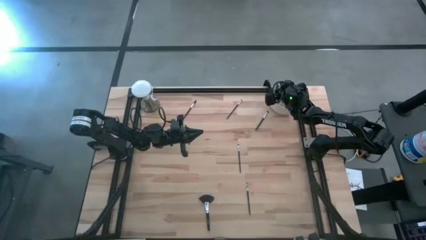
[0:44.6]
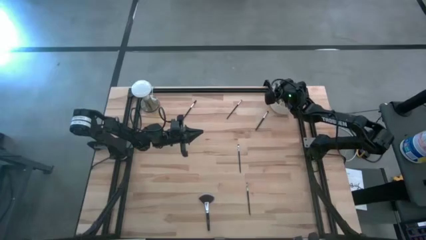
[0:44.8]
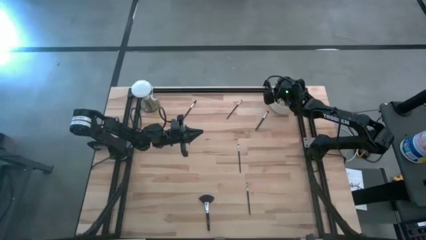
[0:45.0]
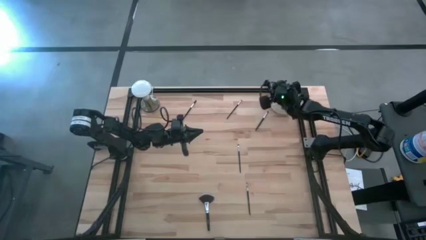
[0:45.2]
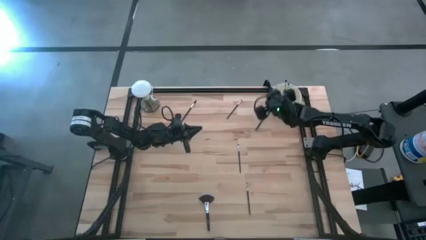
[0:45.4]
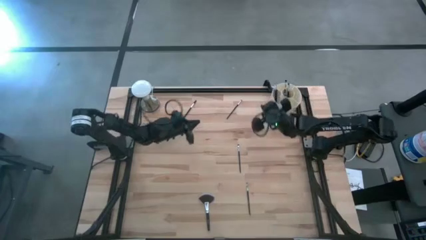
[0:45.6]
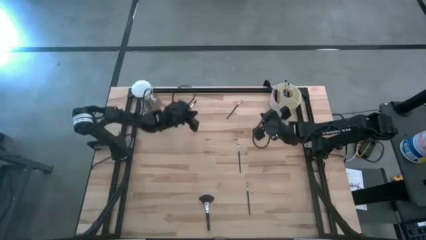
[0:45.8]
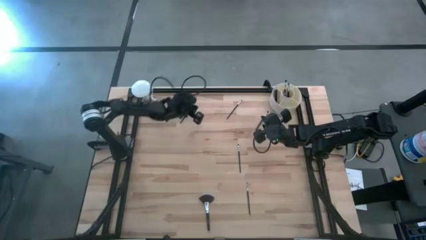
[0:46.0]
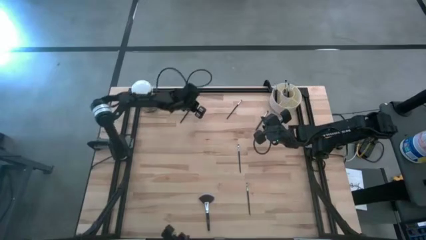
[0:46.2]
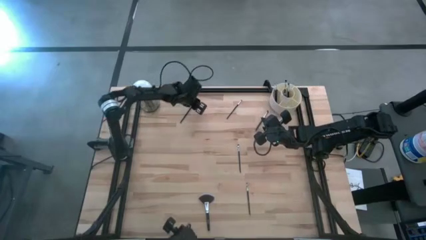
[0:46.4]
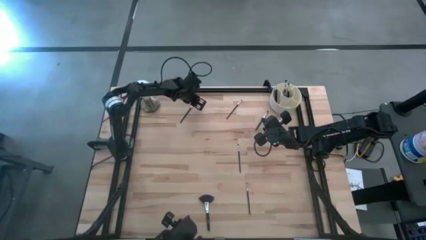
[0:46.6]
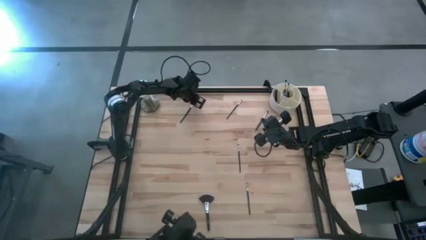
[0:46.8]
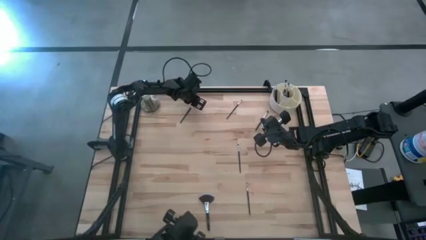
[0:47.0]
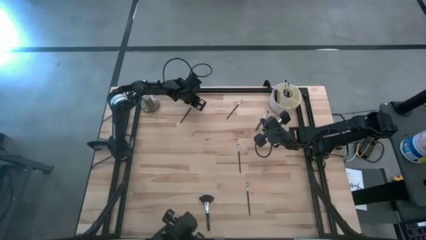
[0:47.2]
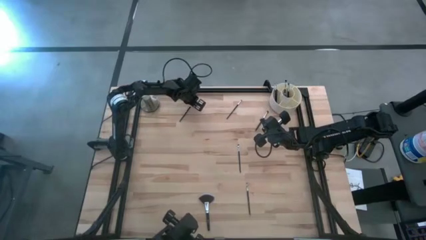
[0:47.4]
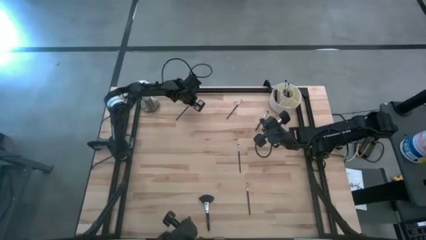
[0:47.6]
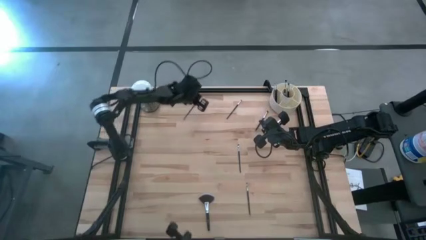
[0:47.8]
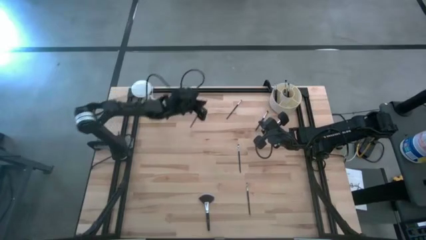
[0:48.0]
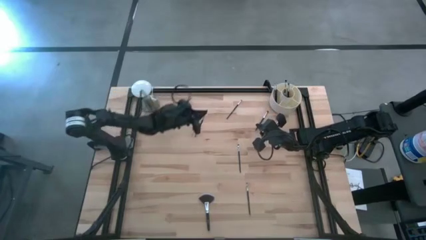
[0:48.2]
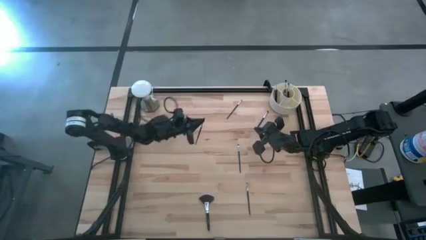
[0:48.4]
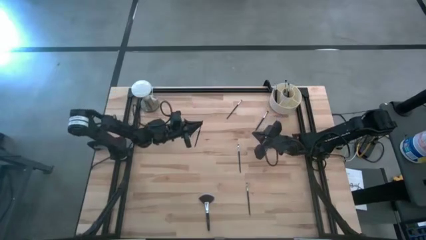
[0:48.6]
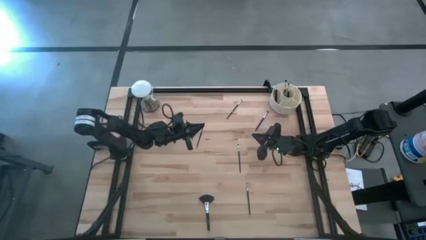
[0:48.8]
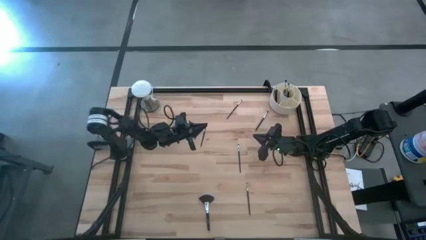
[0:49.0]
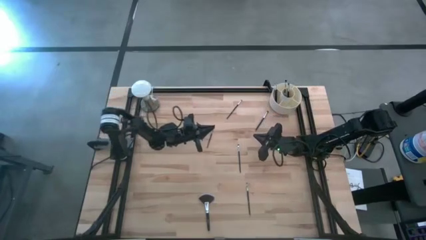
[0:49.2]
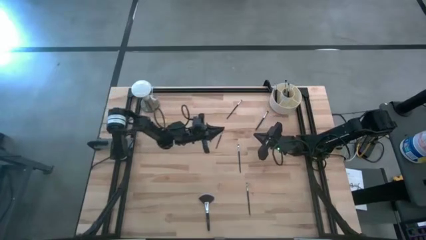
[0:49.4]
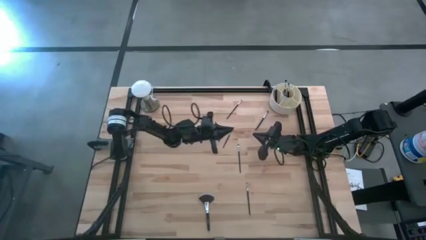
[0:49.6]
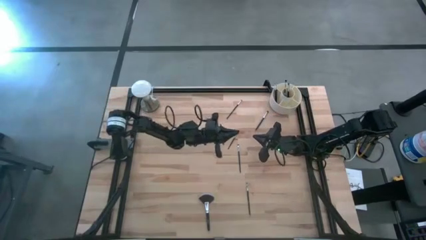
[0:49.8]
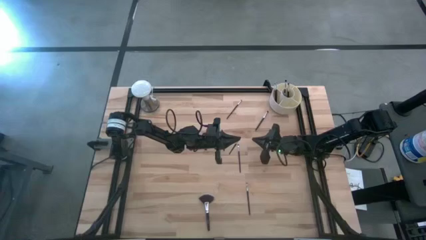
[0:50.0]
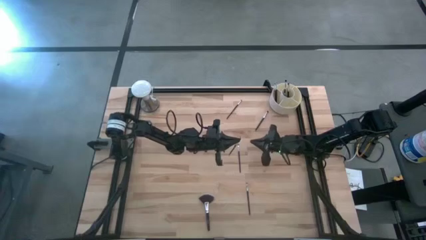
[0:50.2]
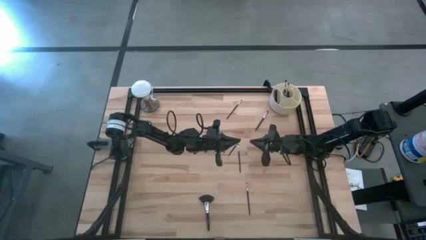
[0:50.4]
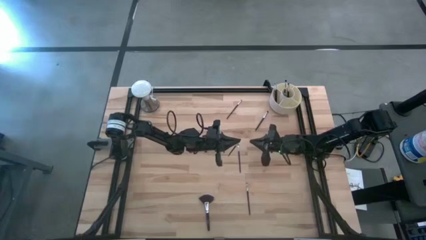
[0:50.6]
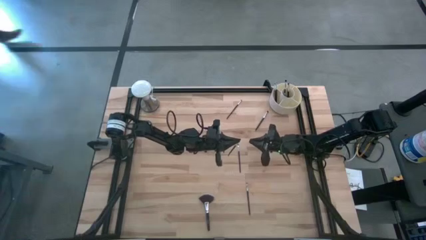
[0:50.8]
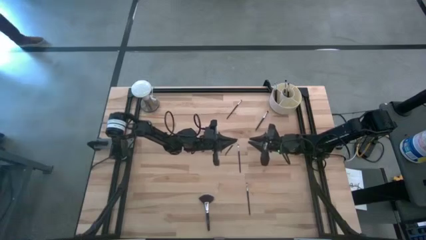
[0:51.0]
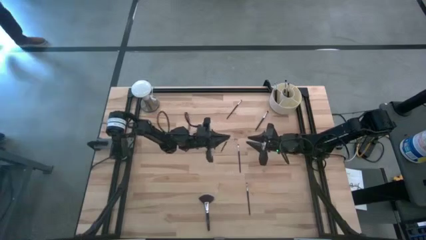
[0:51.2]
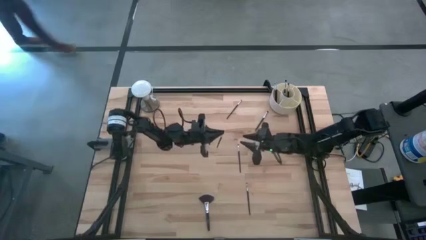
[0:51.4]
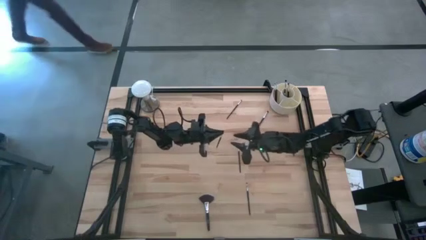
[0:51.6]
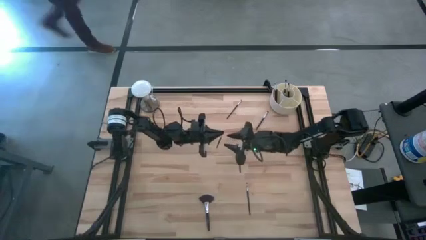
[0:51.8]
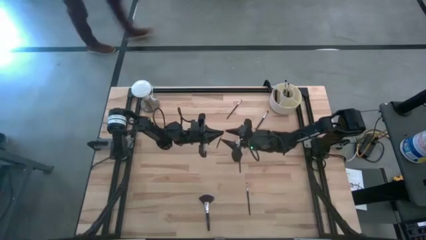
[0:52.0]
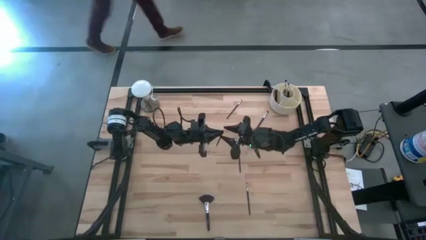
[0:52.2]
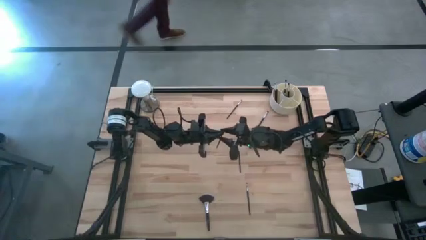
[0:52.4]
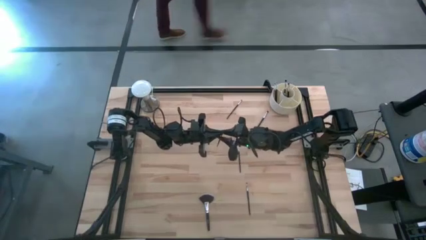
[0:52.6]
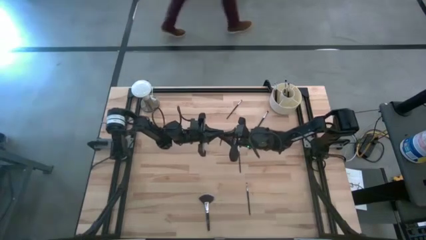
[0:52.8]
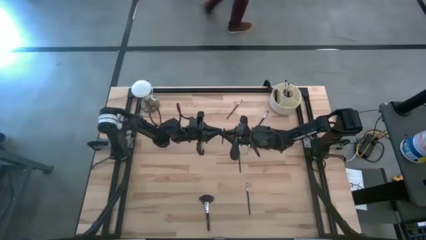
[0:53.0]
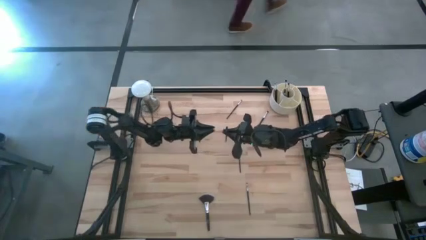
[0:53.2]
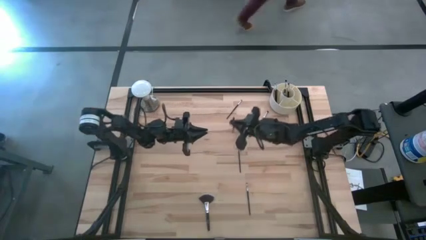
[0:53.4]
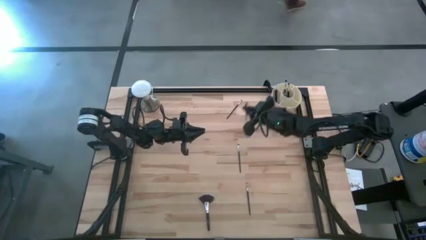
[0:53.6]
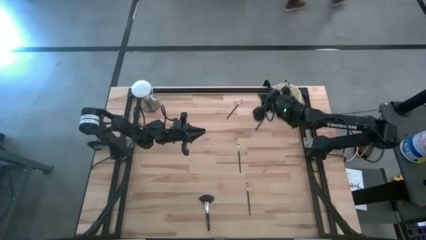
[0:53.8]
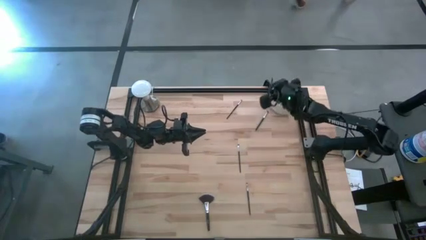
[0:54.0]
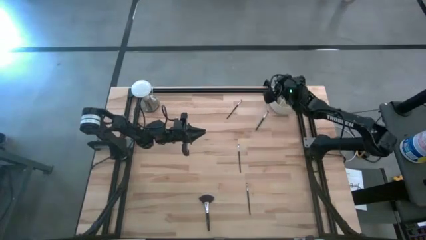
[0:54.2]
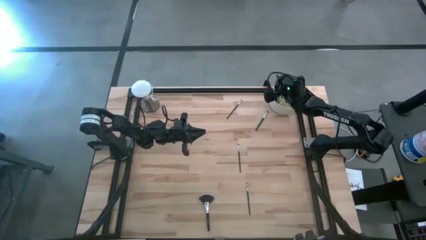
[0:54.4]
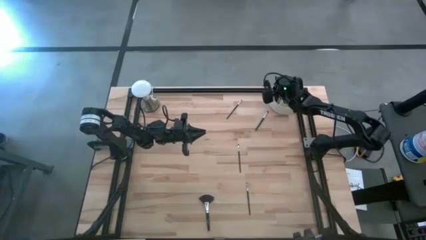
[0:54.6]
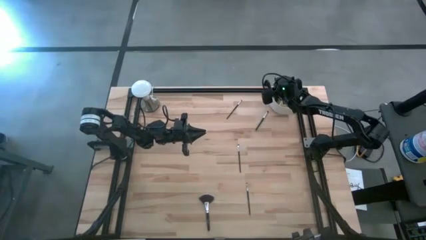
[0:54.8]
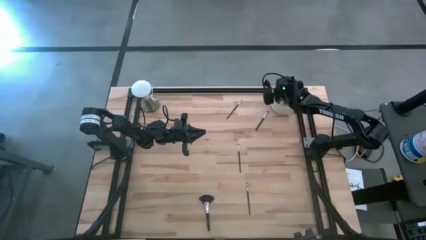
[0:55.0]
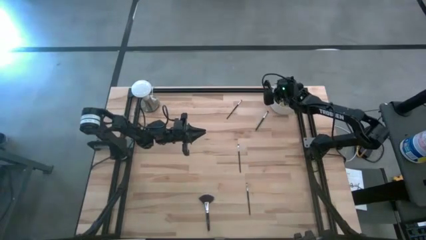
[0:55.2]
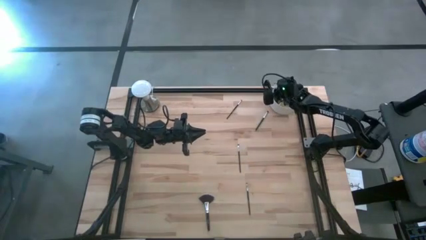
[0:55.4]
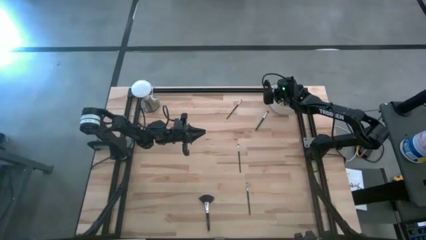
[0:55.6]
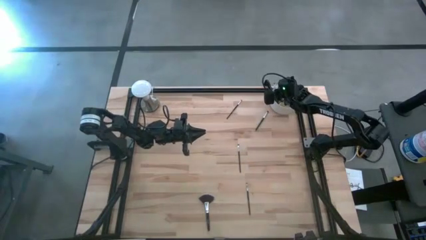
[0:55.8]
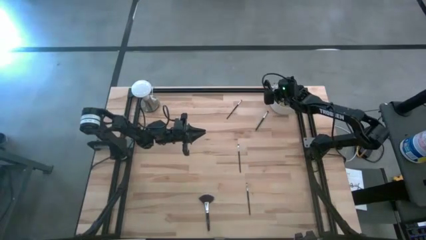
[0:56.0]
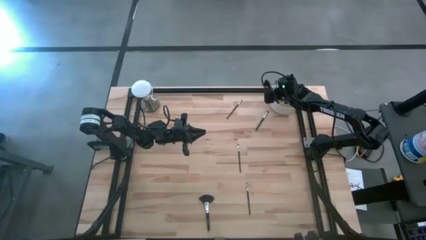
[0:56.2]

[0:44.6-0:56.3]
Task: Pick & Place Makeup Brushes
Put the black lash brow brush into the white makeup holder
